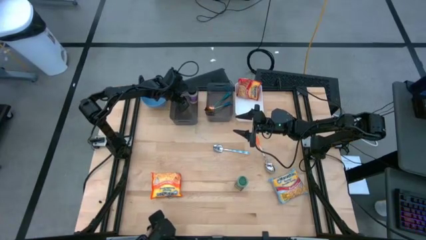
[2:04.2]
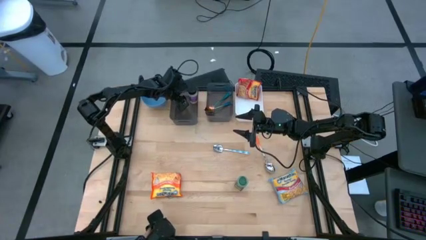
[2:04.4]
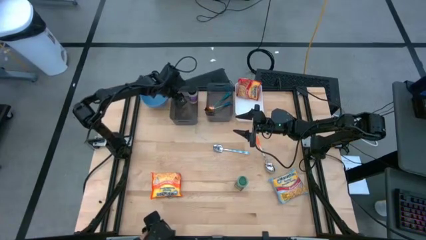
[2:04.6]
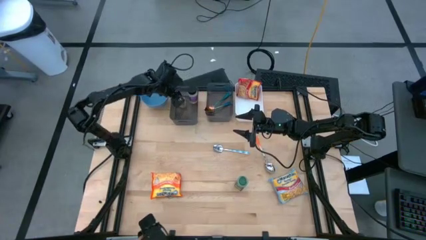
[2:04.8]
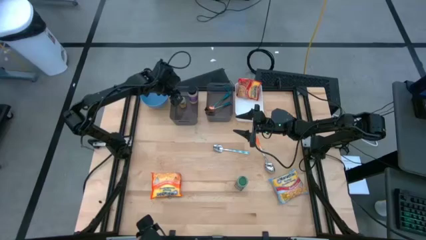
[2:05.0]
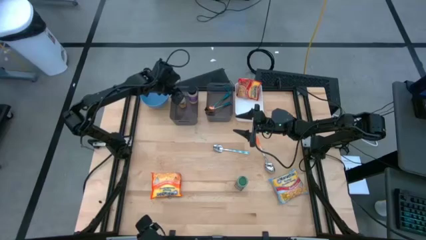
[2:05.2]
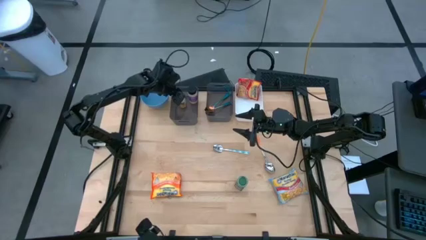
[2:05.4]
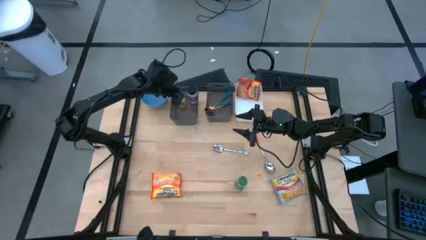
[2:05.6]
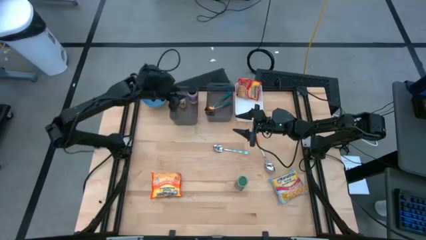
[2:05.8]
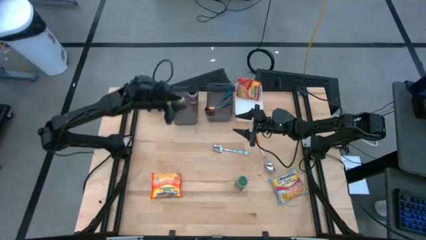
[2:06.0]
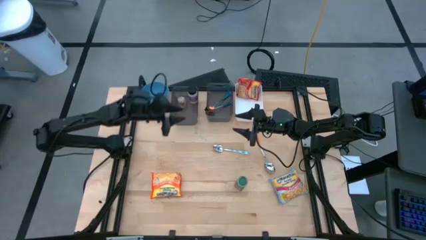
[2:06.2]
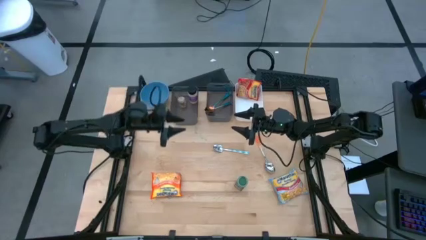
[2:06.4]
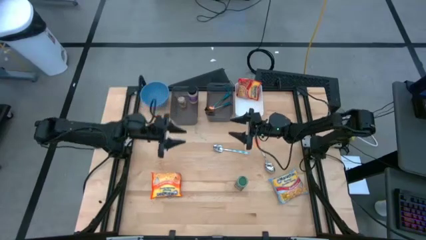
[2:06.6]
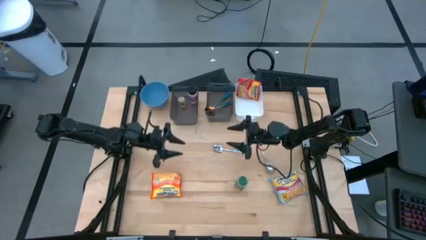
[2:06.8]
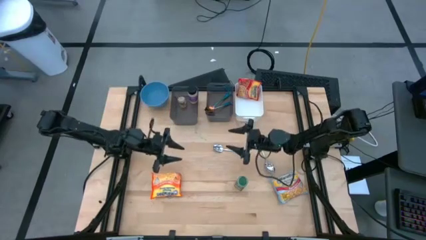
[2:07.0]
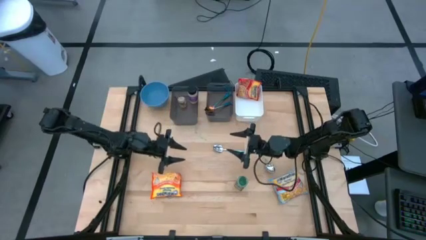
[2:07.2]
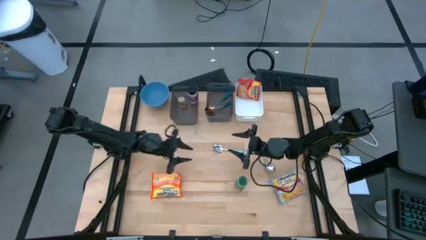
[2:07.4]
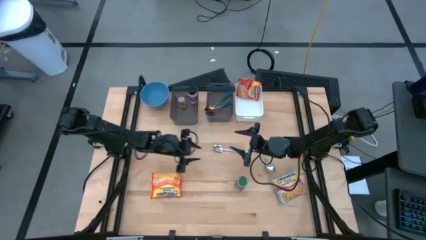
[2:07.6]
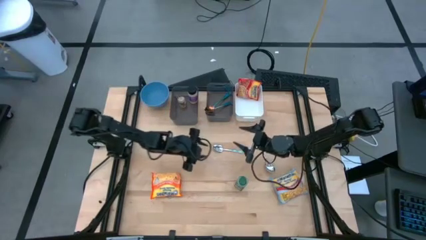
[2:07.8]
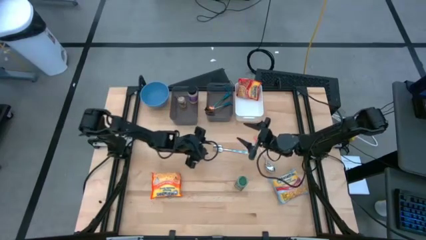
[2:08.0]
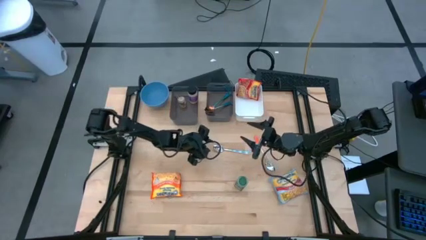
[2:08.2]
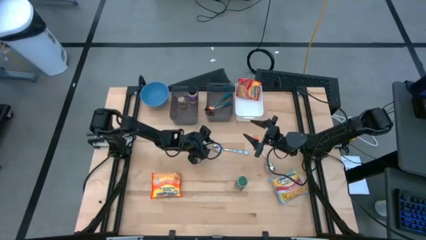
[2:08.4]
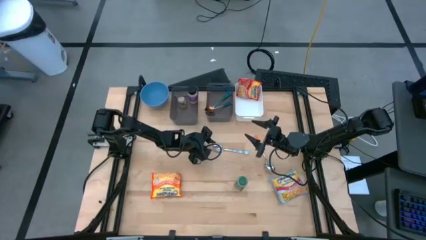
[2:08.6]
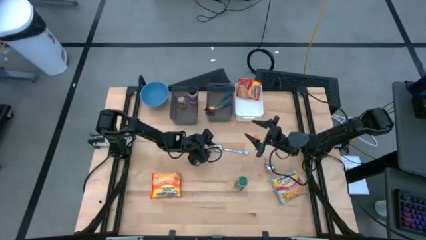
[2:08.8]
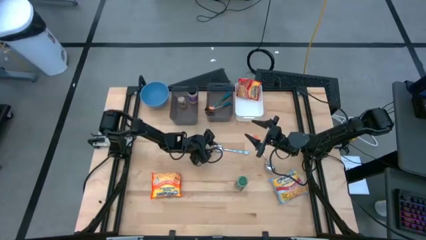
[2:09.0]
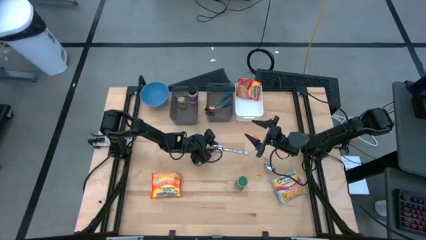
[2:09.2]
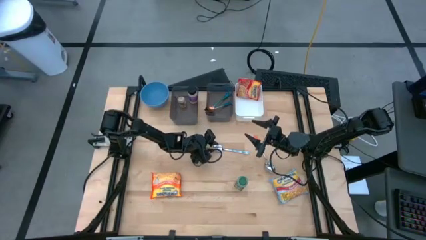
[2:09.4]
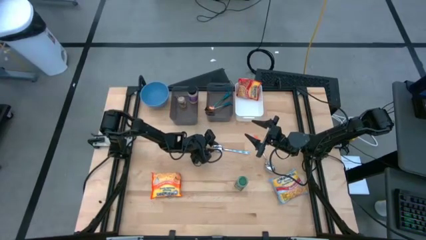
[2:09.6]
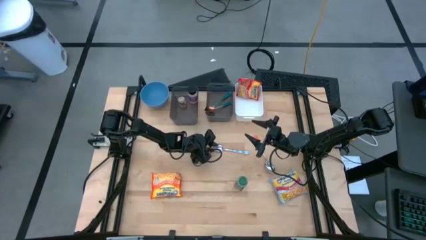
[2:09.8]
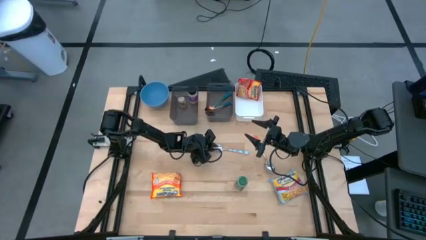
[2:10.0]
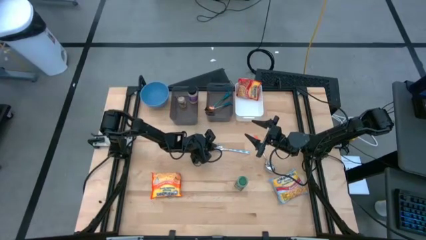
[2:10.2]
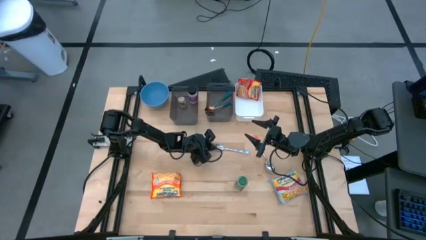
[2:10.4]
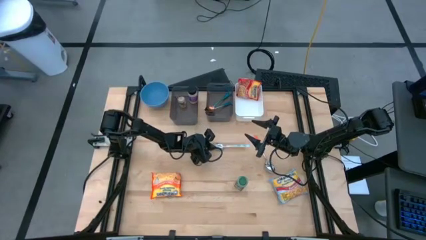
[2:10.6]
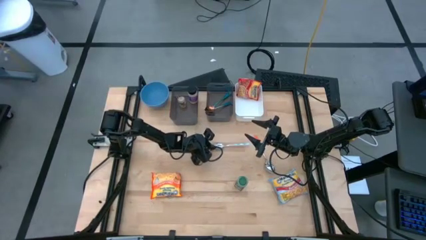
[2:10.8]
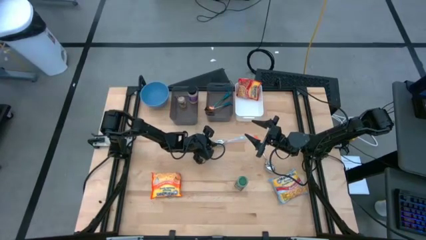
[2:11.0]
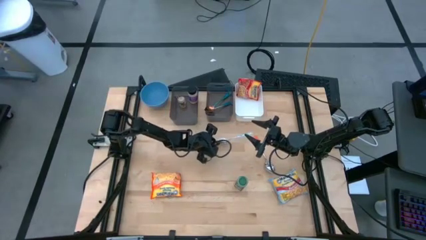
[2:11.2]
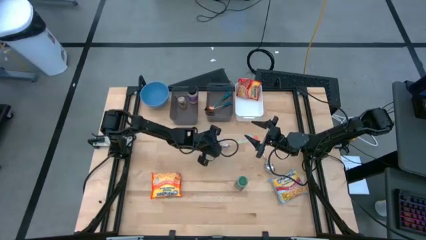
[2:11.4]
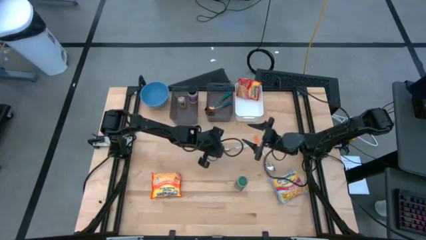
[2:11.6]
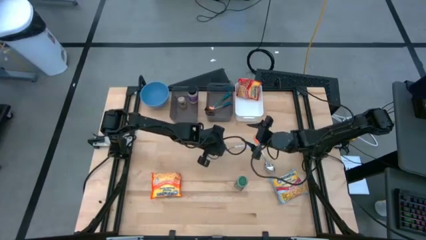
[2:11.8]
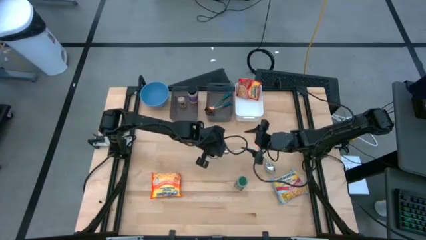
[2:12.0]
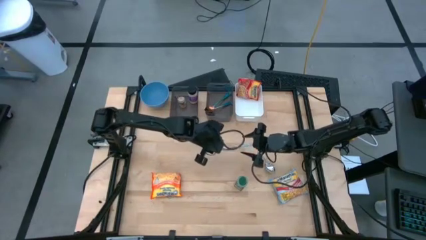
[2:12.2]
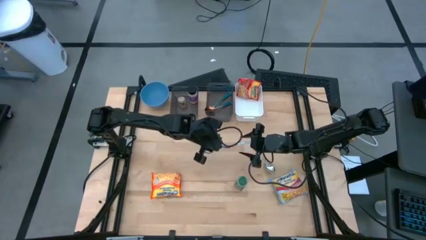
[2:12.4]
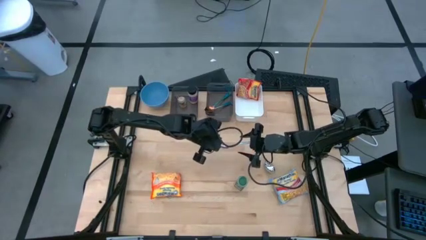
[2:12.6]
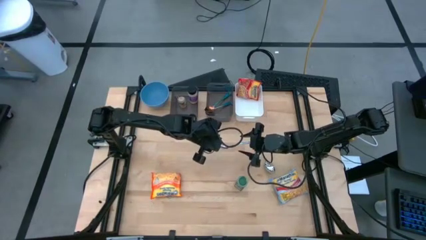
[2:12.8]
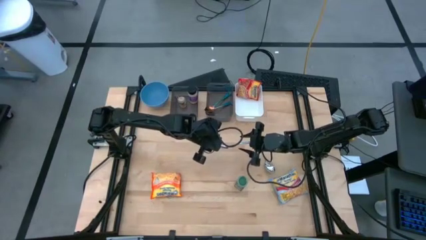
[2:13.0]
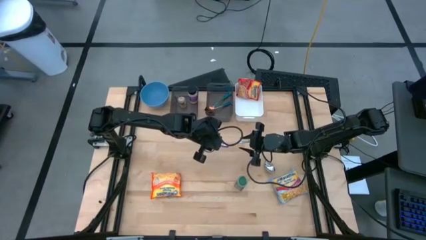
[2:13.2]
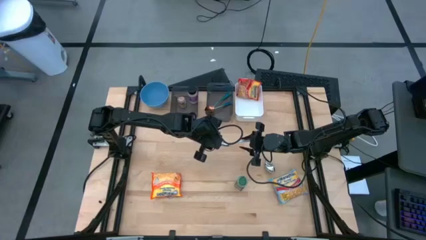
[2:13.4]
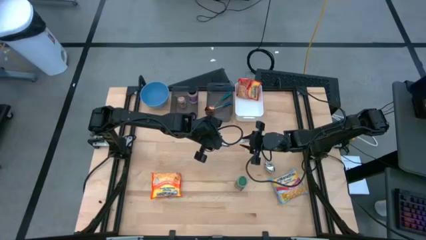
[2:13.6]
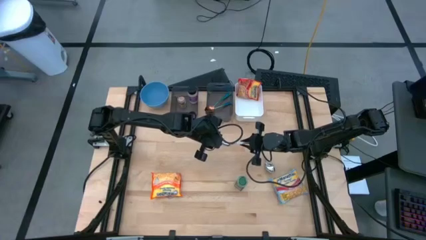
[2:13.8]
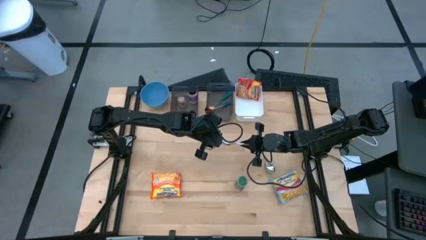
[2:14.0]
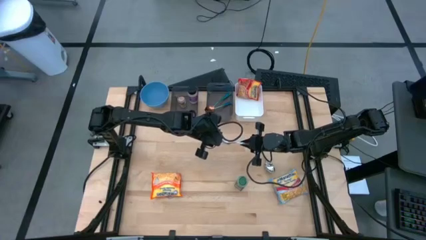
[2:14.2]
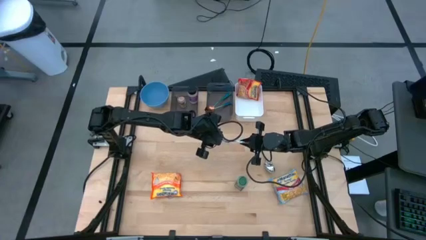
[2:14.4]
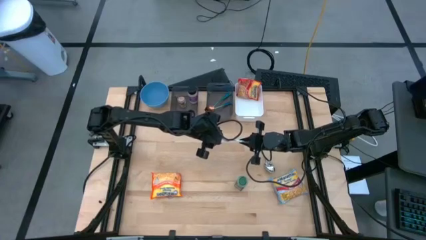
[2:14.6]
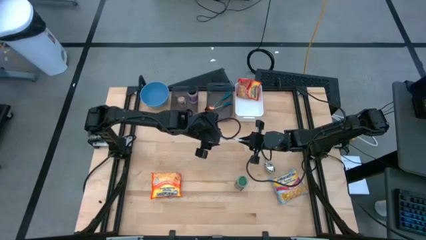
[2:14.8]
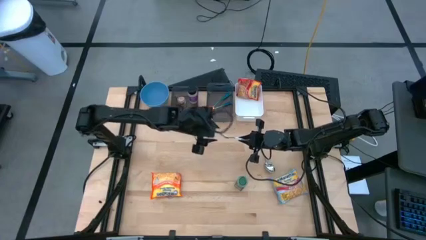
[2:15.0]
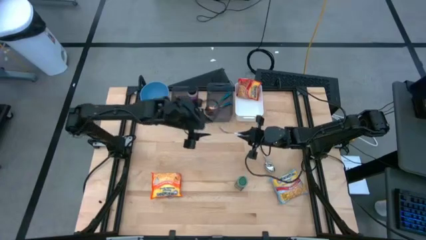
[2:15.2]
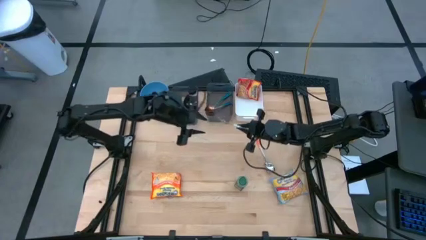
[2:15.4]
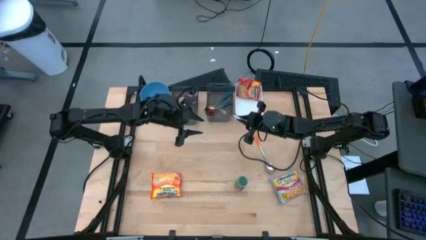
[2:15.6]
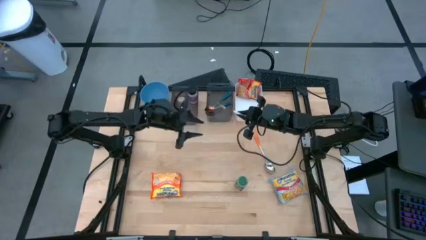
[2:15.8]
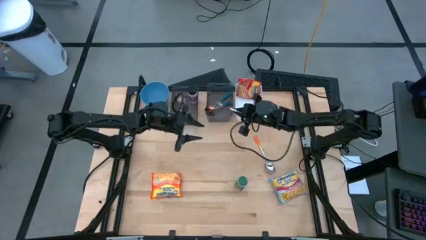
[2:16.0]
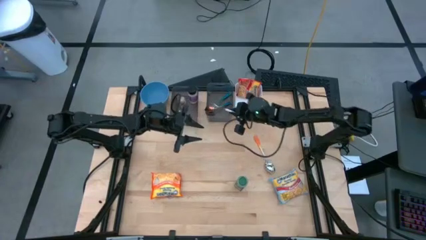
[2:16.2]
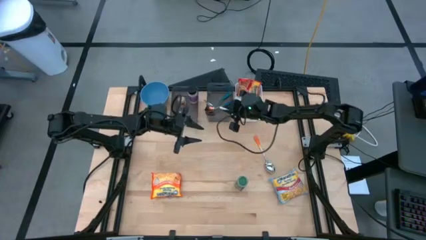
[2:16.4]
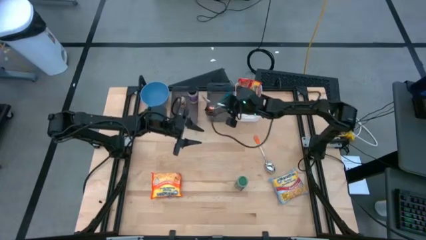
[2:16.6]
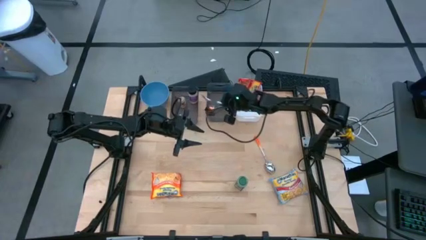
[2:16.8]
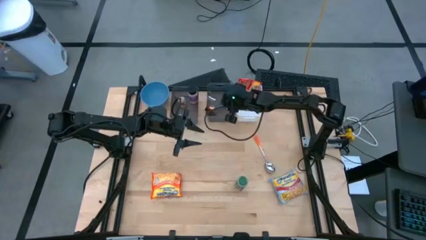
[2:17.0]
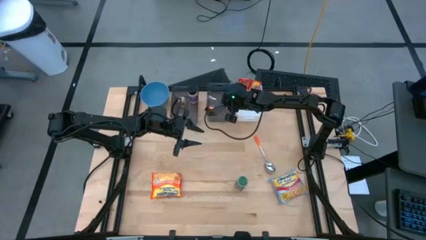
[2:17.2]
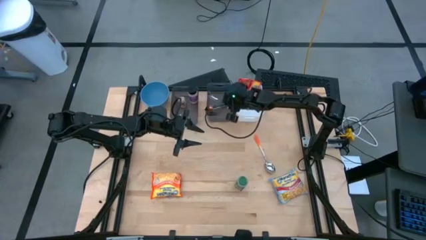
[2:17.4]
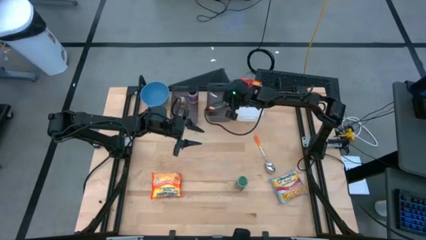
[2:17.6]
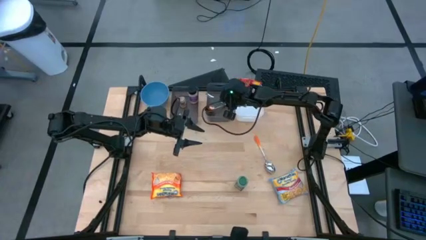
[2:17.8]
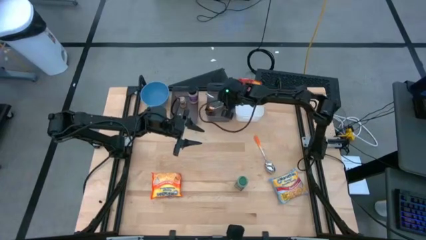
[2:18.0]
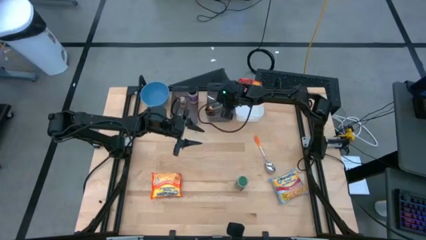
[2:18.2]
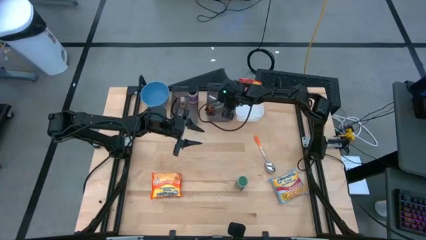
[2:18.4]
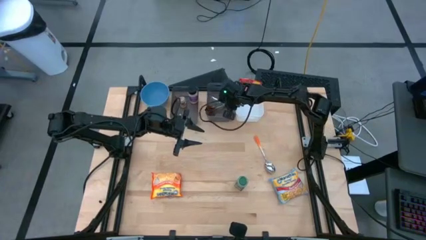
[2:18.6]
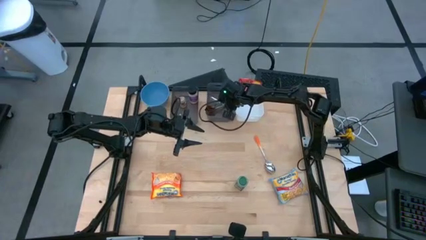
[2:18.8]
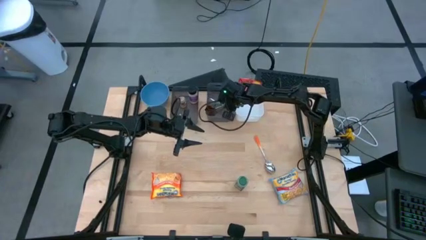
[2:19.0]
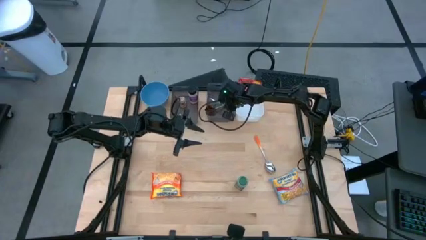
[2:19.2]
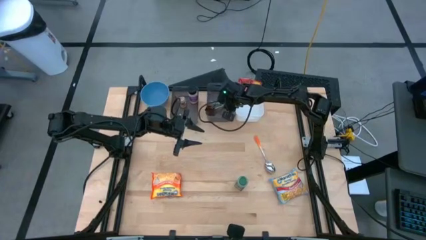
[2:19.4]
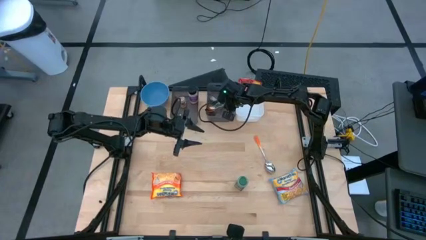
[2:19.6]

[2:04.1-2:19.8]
Task: Pick & Place Food Item
Put the white patterned spoon into the right black bin

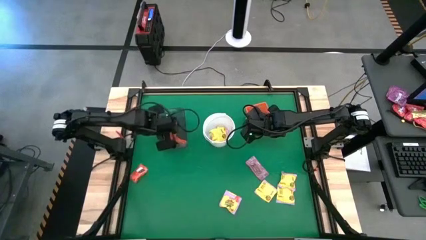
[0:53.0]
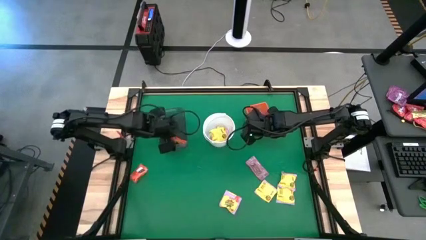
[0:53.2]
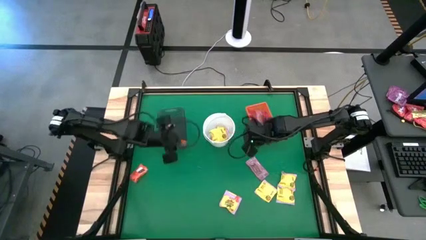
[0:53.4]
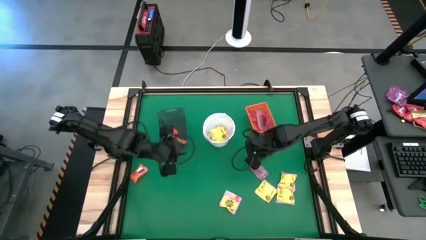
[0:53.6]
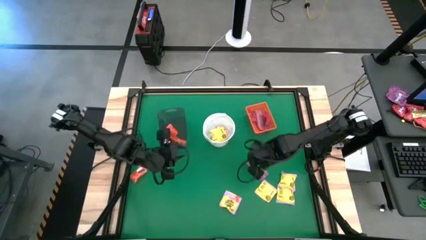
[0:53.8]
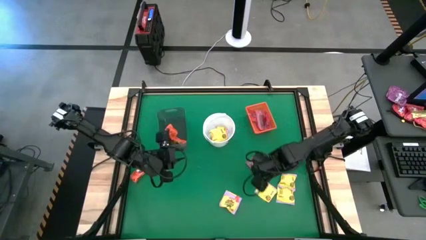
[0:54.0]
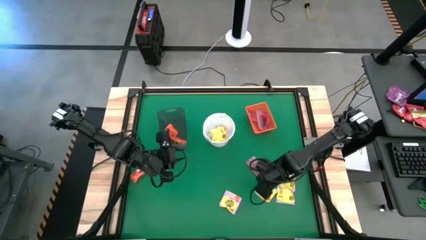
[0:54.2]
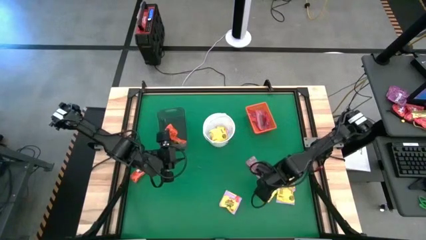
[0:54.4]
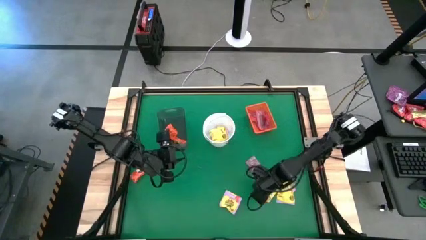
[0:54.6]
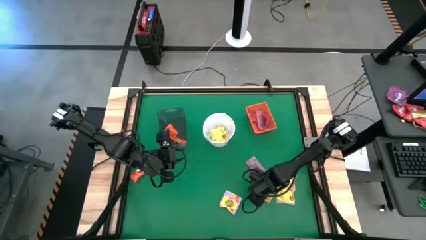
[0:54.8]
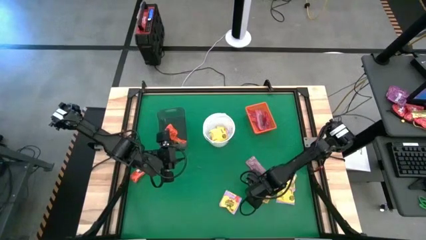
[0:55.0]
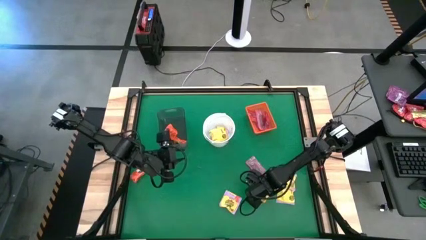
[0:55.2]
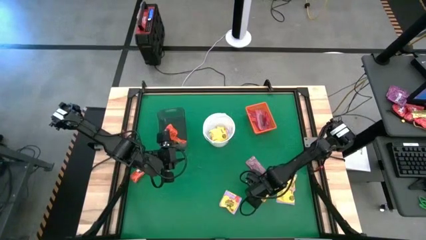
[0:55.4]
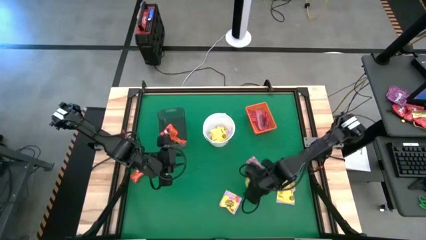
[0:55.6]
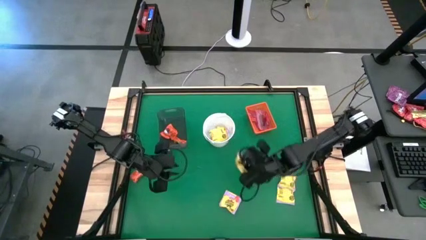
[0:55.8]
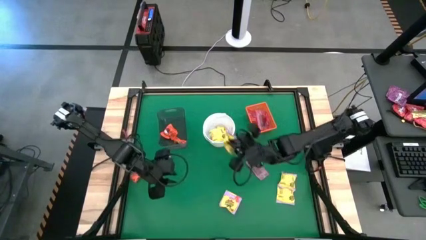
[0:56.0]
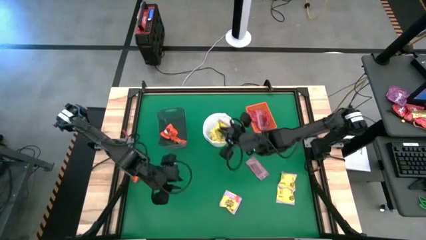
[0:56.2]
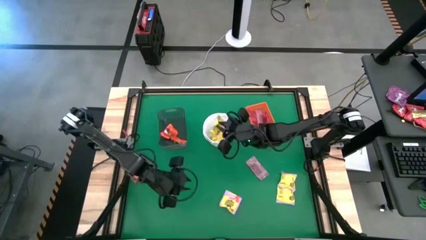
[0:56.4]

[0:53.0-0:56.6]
Task: Sort candy by brand, put in halloween buckets
Put the yellow candy into the white bucket
